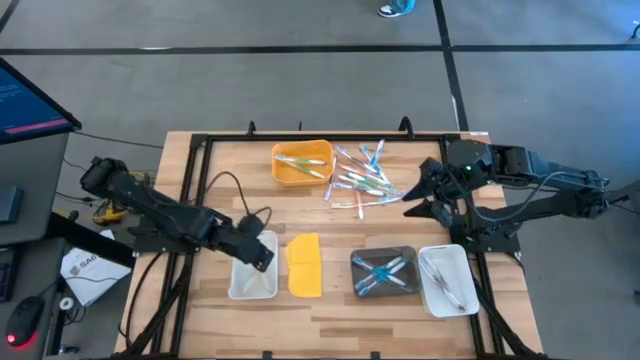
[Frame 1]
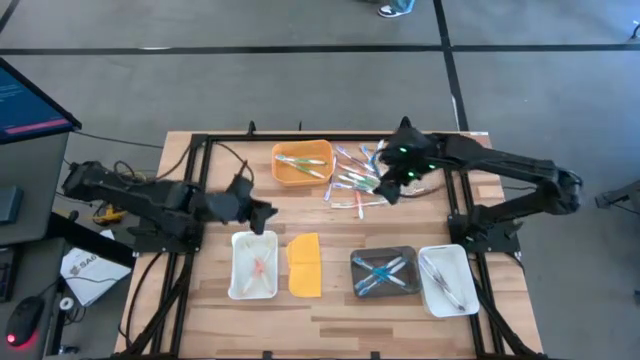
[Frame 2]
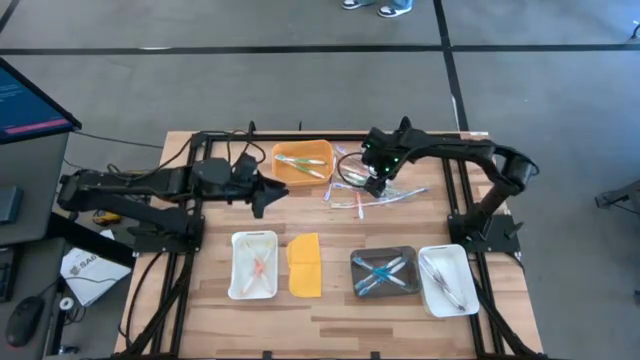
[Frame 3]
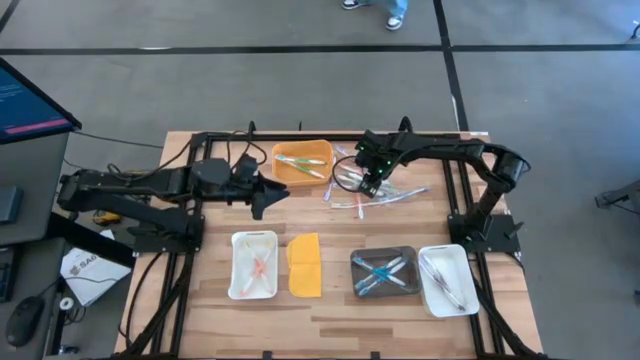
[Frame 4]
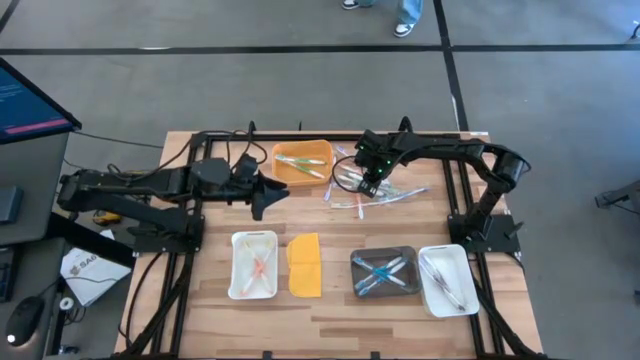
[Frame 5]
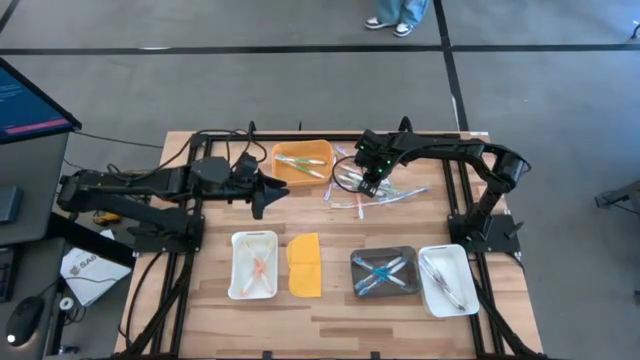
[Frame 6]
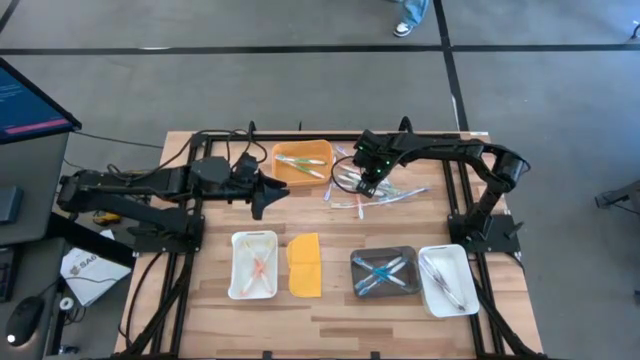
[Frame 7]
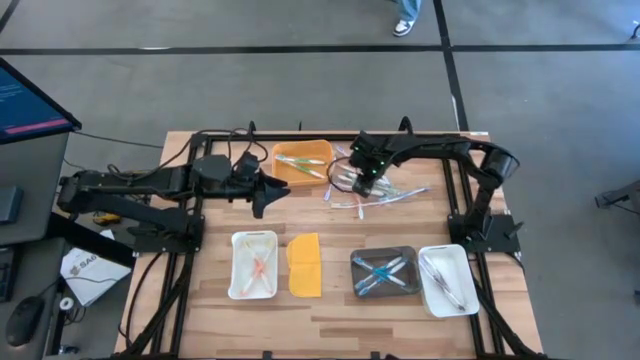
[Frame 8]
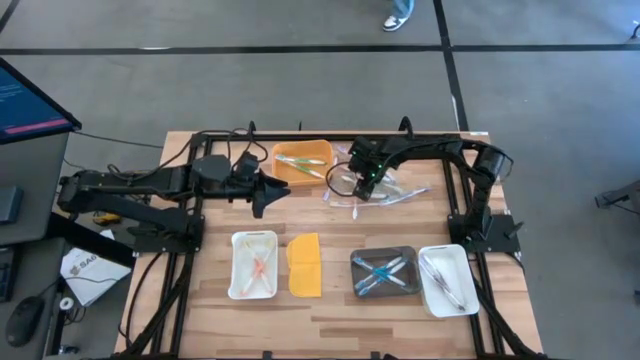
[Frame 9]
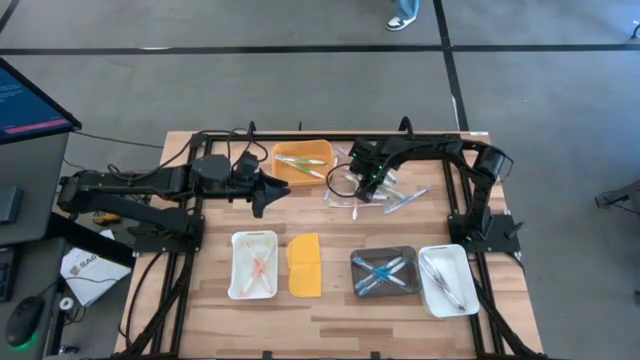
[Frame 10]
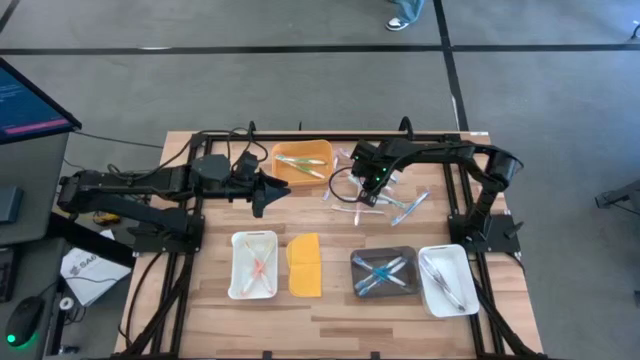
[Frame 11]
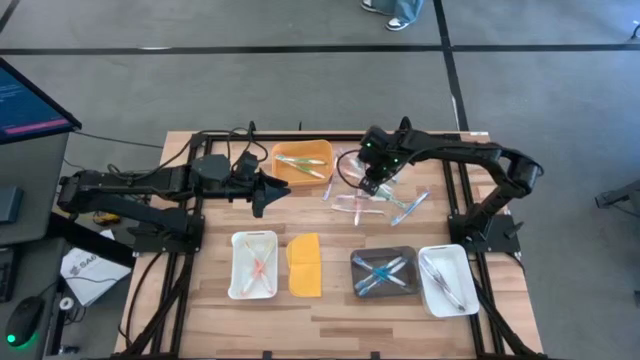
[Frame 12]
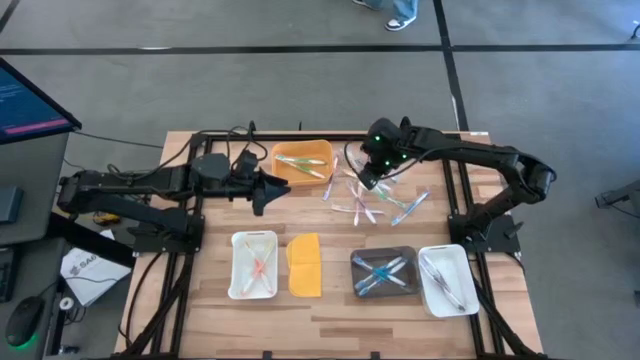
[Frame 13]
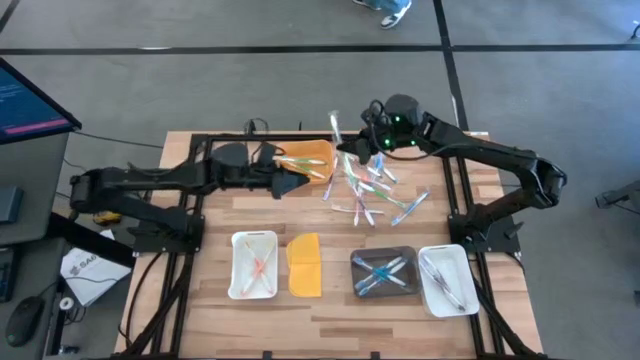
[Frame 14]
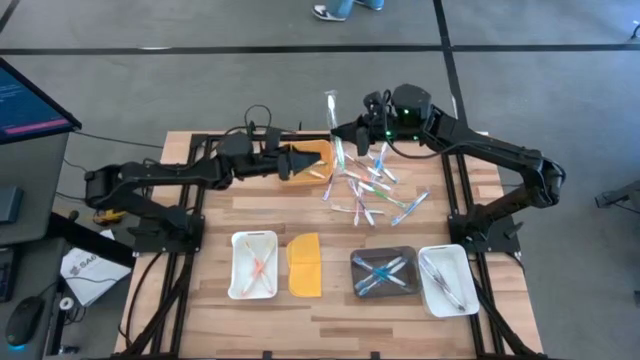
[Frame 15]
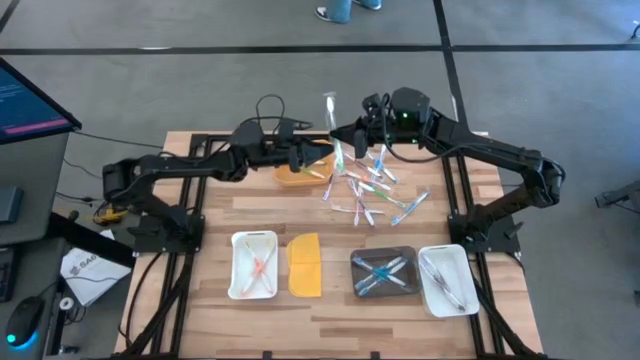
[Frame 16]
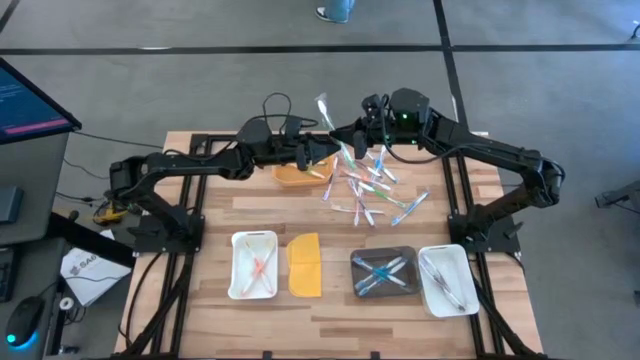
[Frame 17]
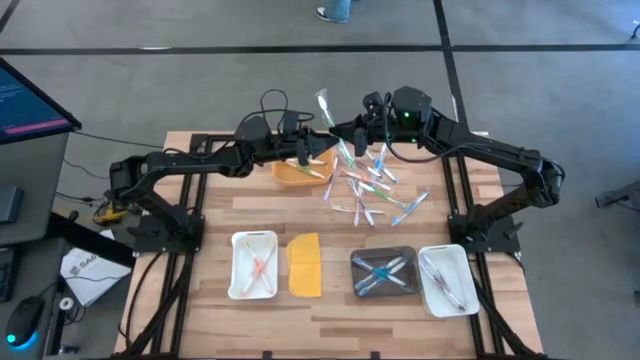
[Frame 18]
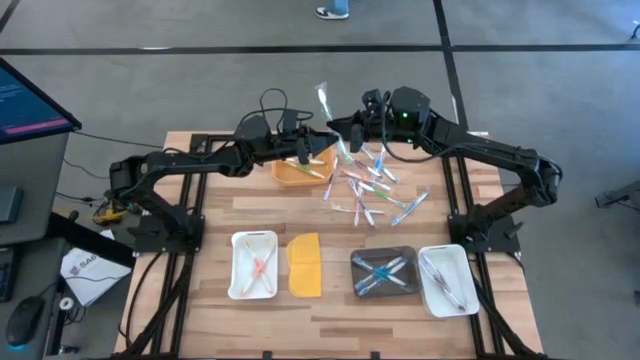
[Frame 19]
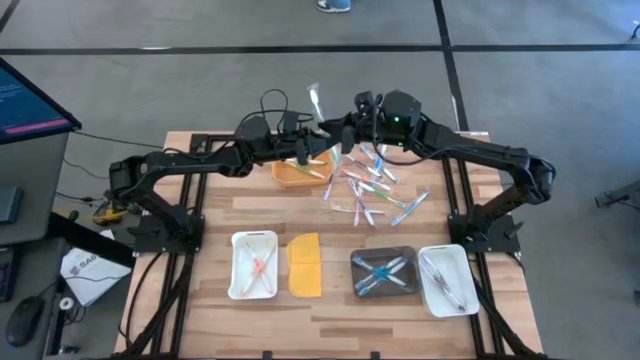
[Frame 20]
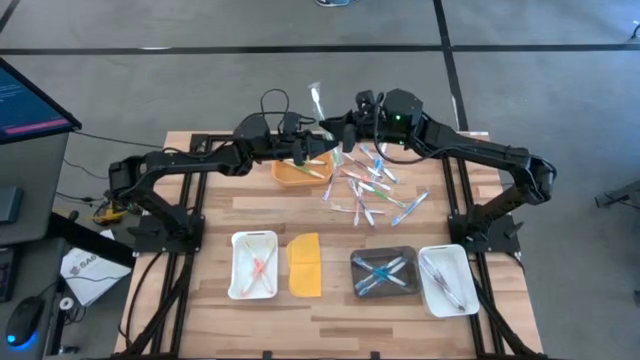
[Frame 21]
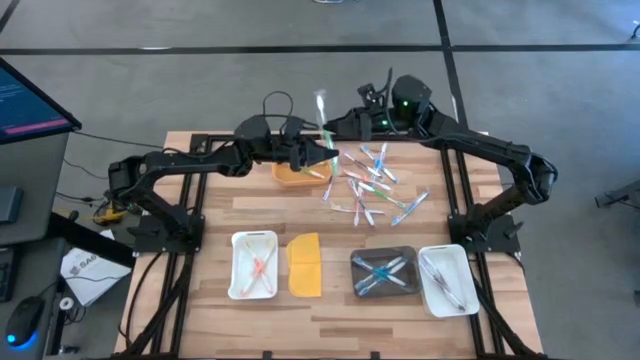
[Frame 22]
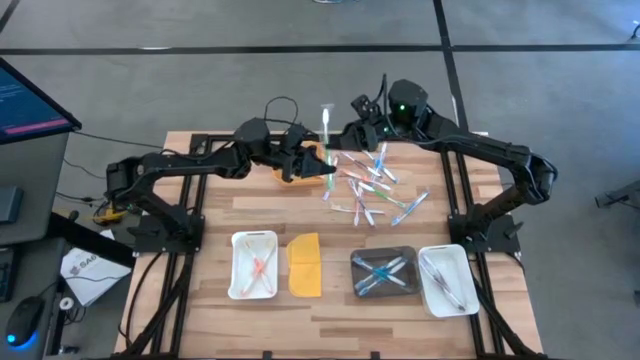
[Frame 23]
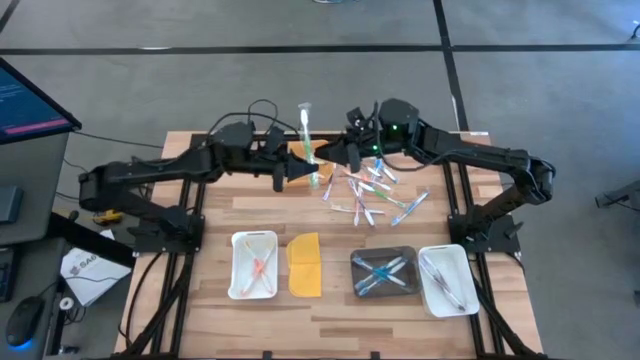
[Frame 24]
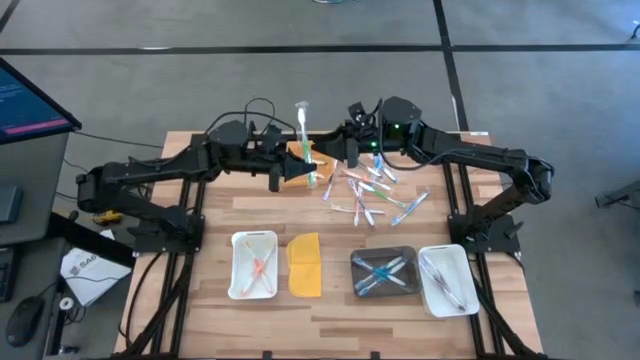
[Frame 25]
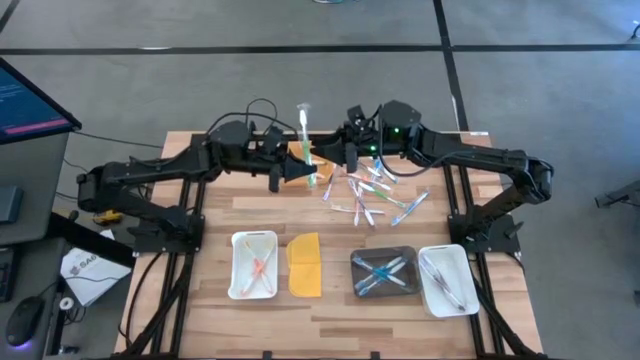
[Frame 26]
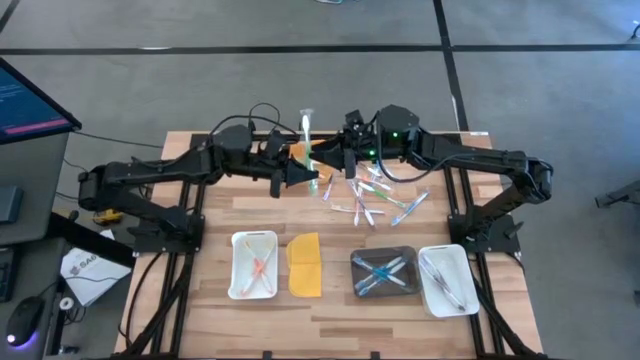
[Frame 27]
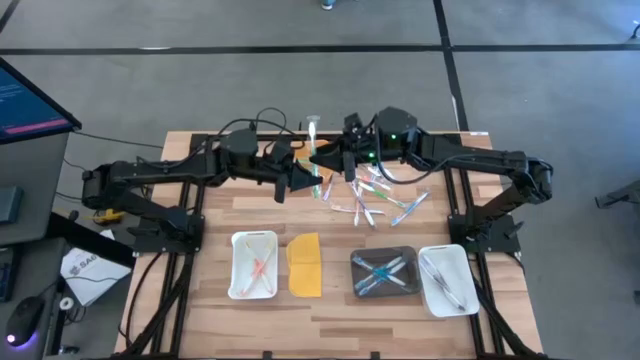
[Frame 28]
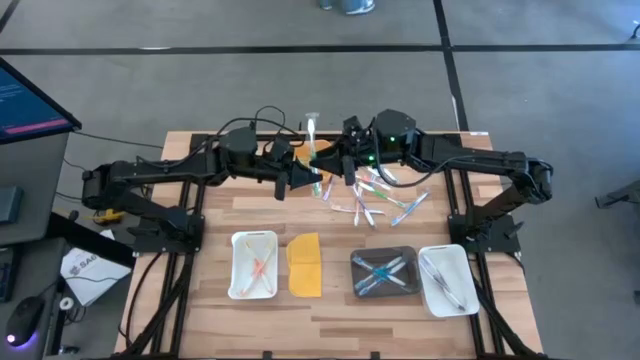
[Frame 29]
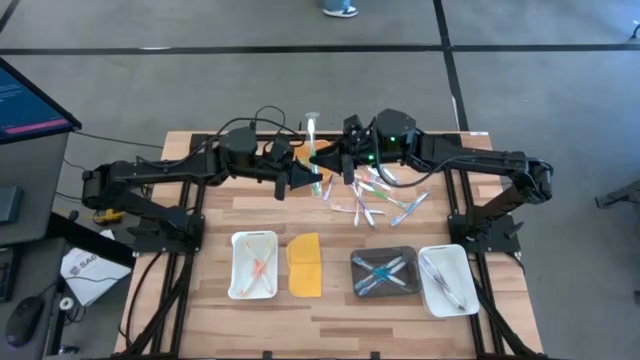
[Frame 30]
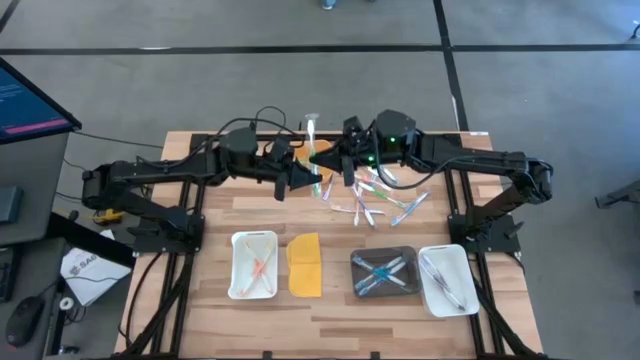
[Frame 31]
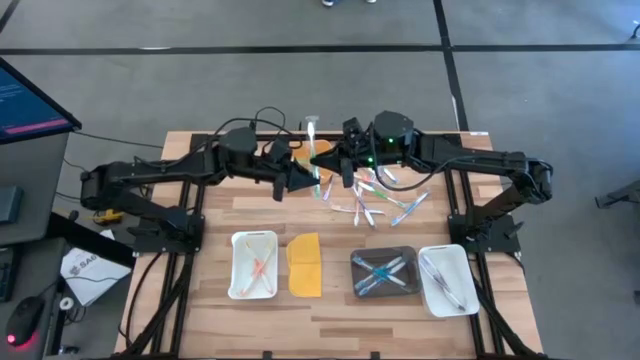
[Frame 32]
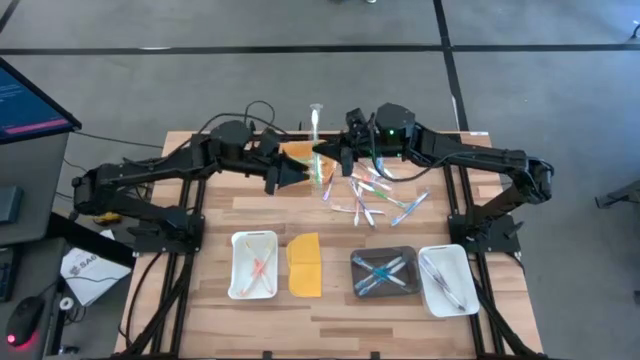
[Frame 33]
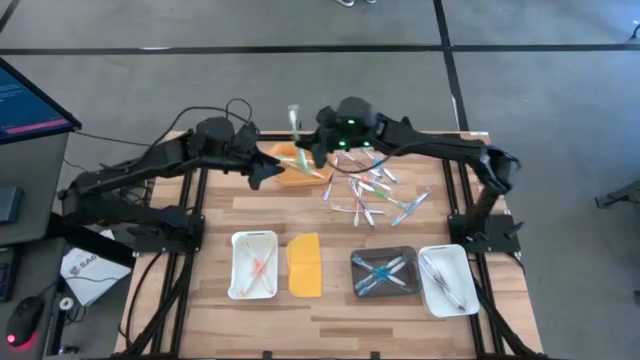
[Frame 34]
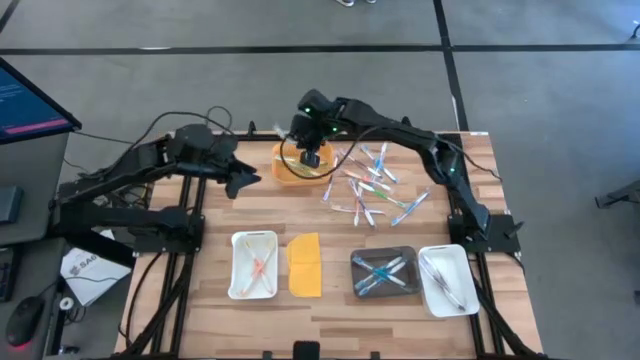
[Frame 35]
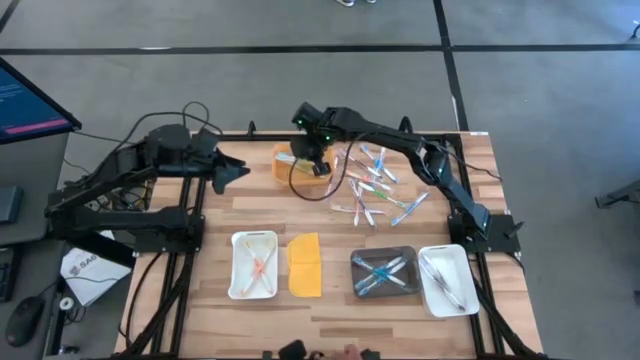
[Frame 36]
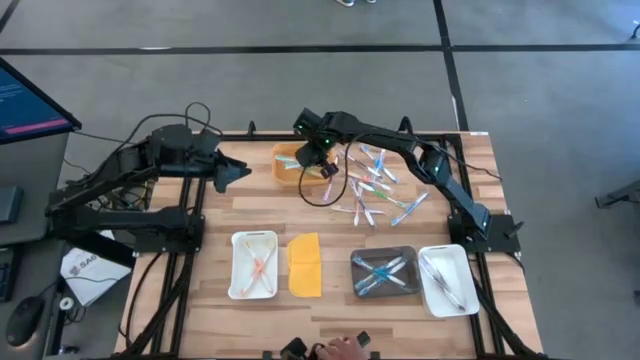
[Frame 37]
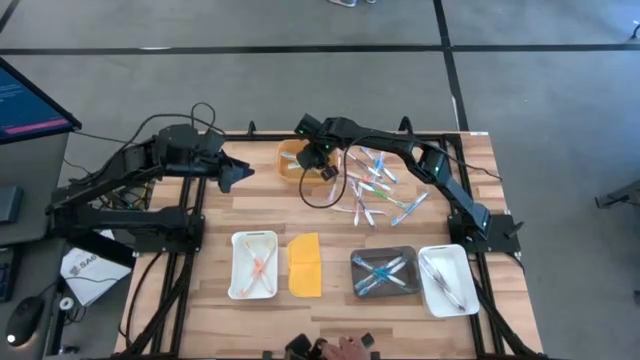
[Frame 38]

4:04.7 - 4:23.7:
Task: Pick & Place Toothbrushes
Put the green toothbrush into the yellow bin

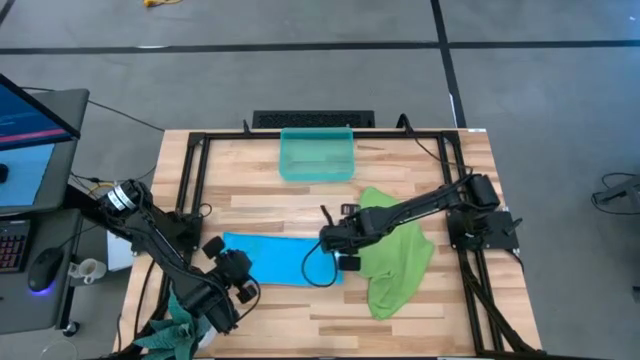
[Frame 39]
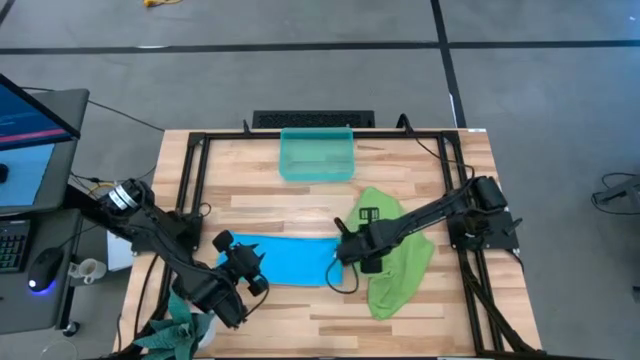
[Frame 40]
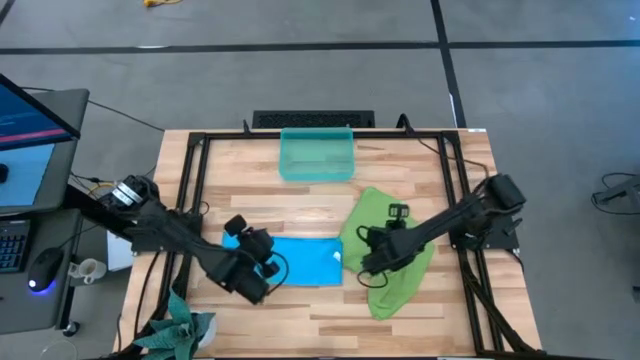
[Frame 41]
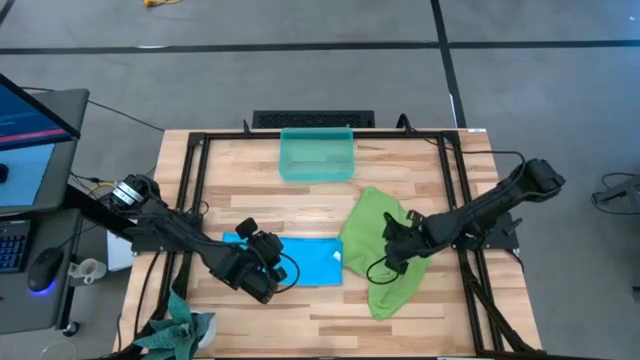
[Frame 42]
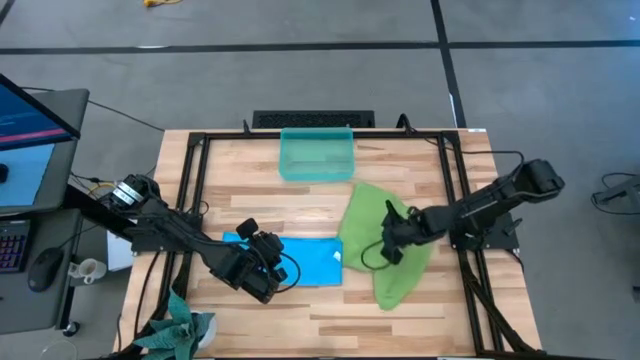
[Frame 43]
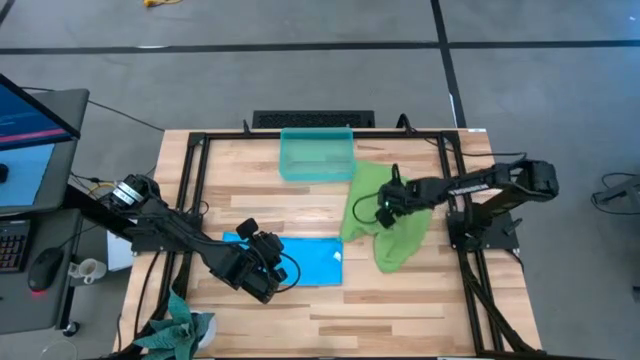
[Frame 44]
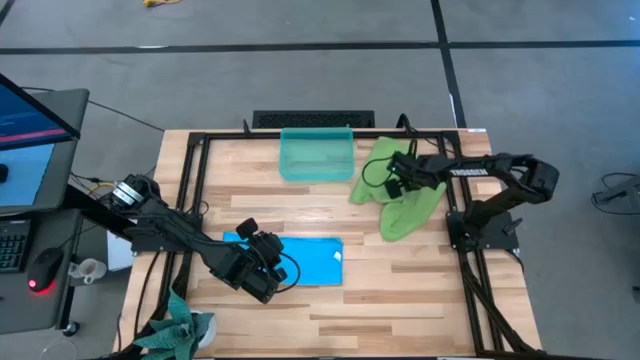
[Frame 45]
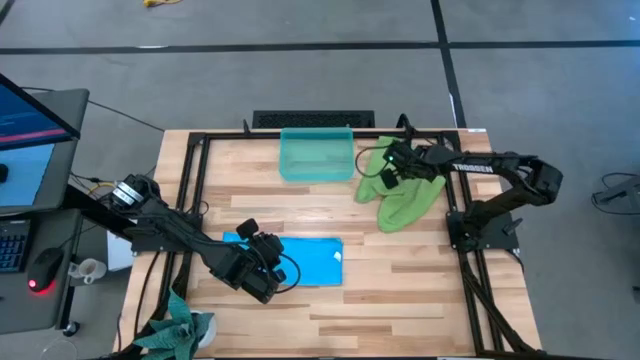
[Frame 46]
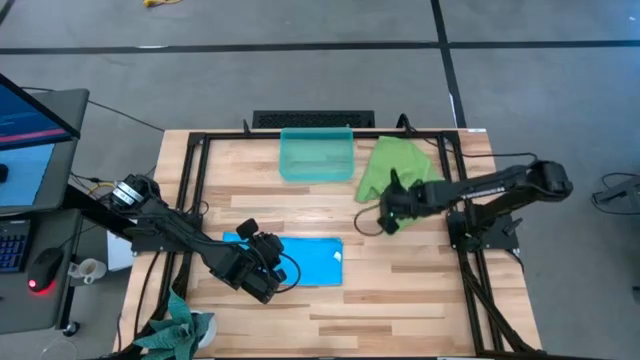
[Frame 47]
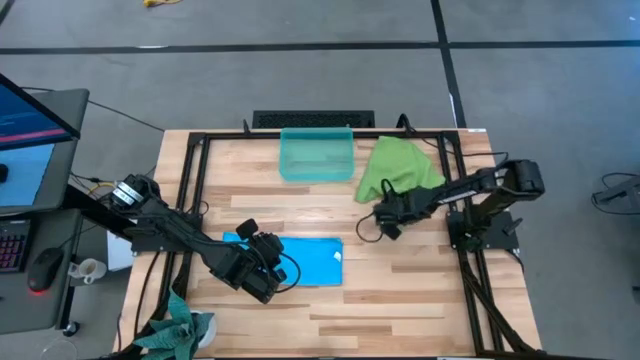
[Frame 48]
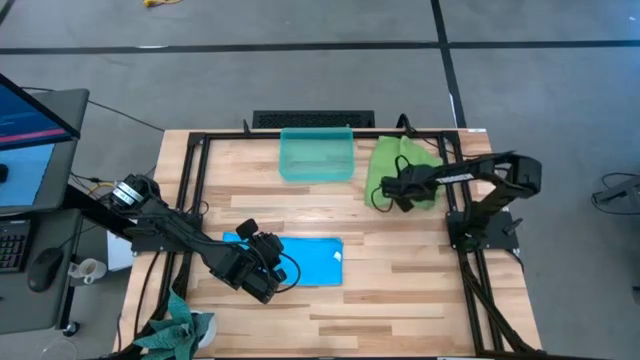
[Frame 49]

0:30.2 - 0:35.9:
Task: Roll microfiber towels into tight, uniform cylinder then place into a basket
Adjust the green microfiber cloth
